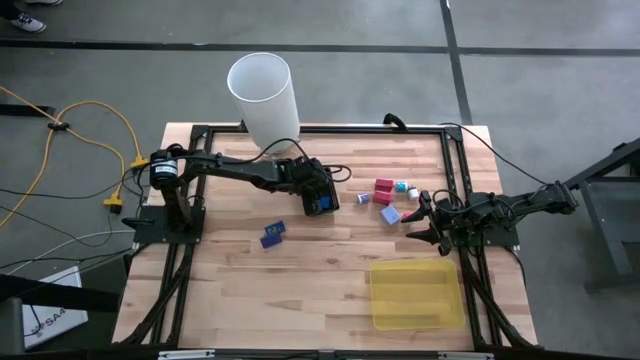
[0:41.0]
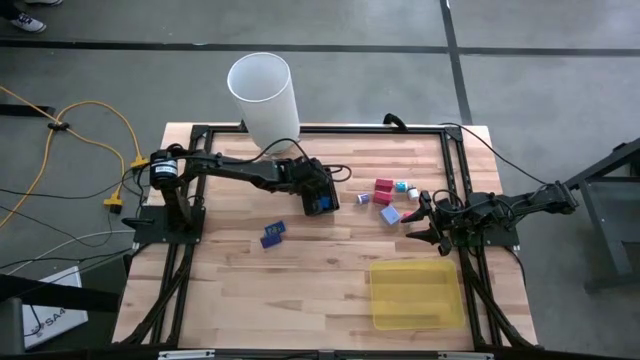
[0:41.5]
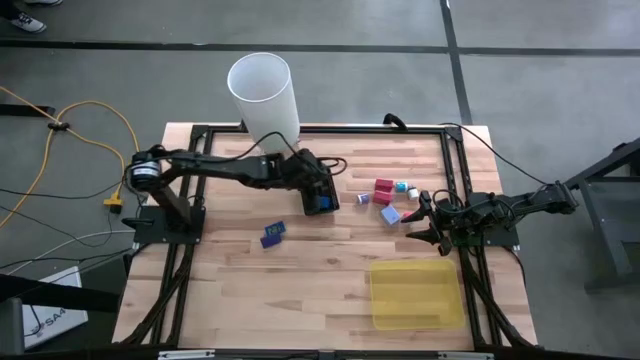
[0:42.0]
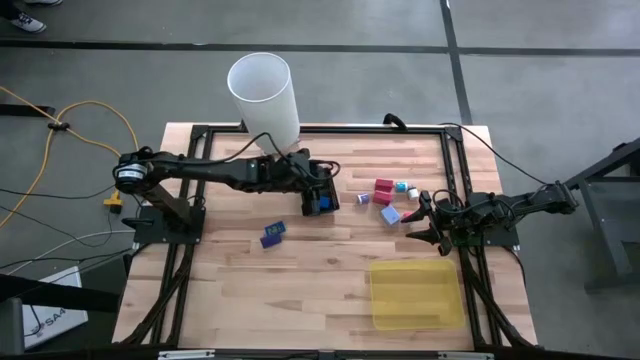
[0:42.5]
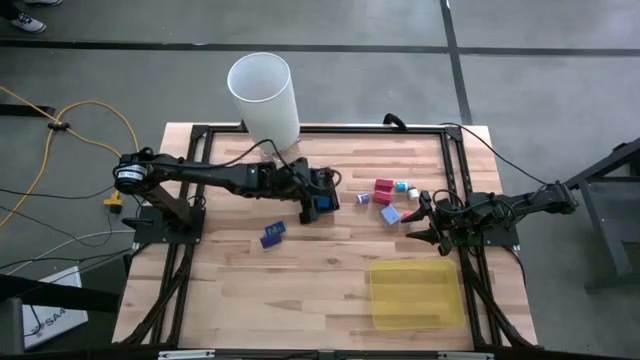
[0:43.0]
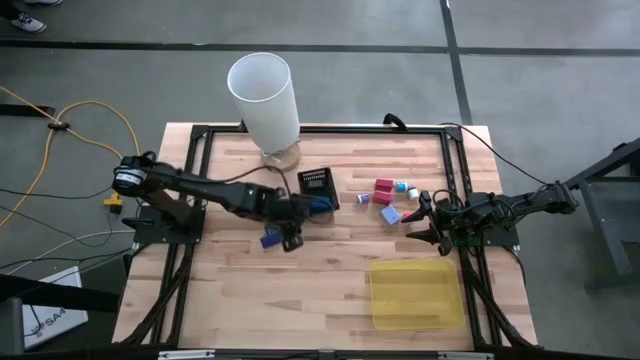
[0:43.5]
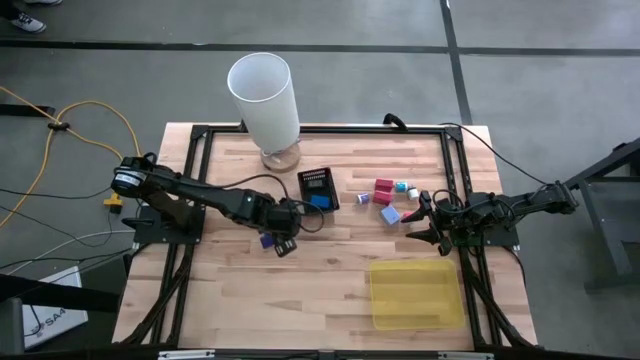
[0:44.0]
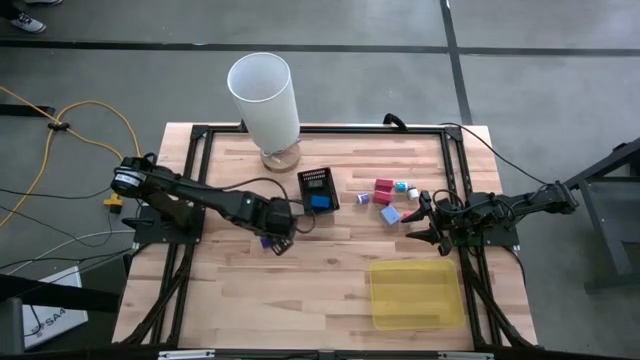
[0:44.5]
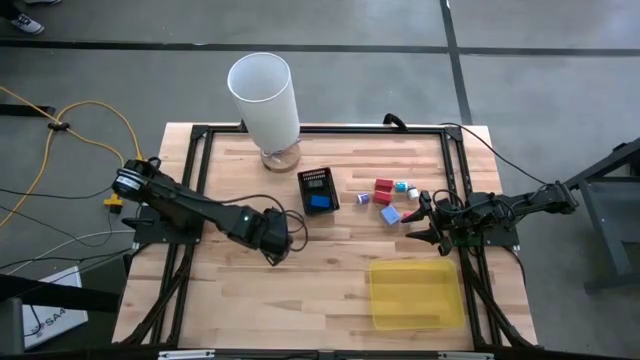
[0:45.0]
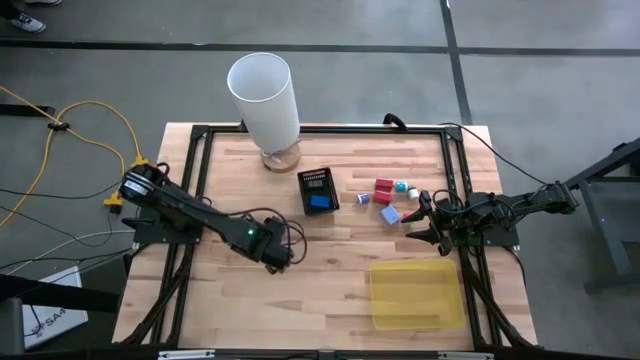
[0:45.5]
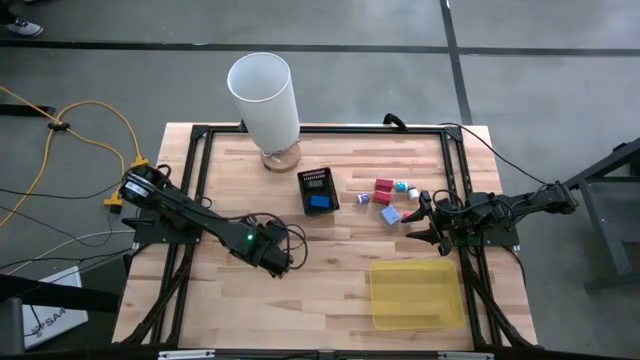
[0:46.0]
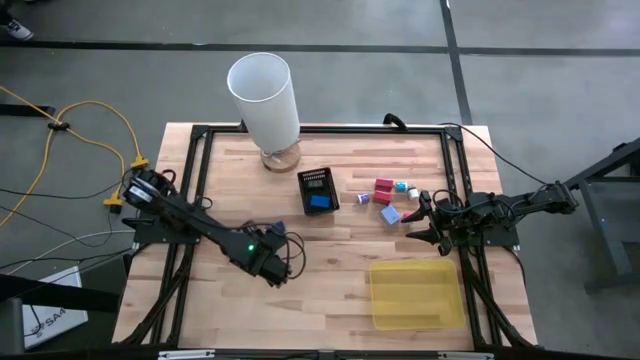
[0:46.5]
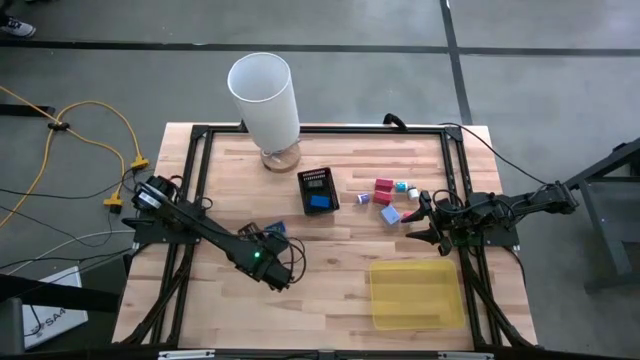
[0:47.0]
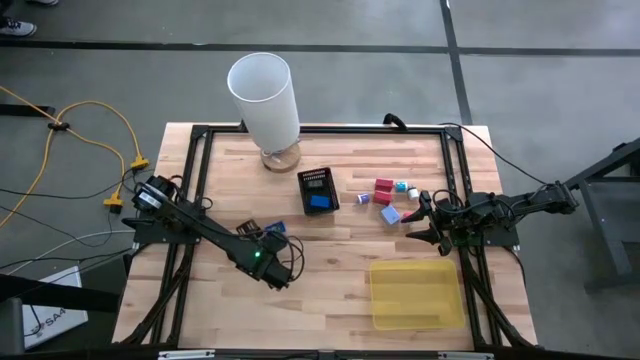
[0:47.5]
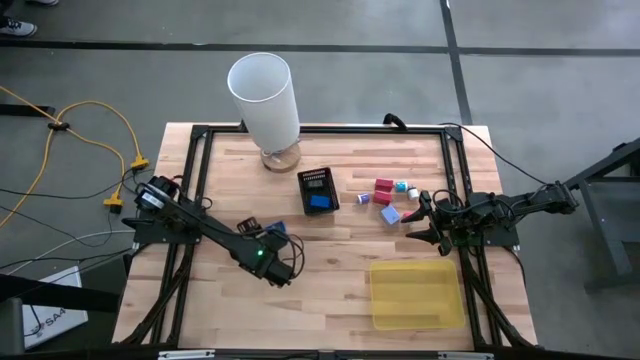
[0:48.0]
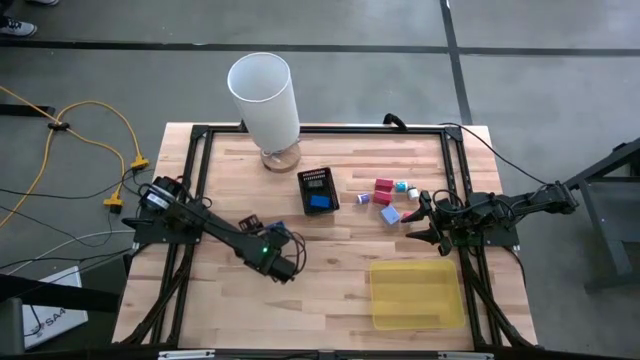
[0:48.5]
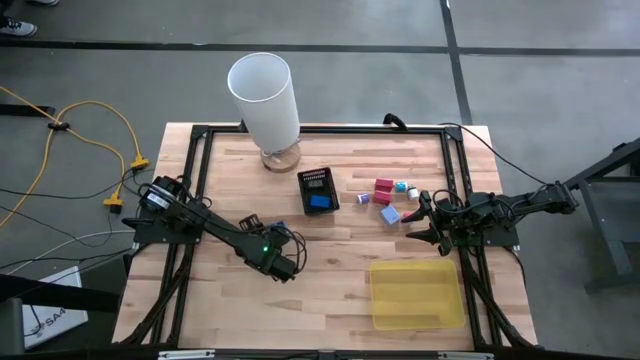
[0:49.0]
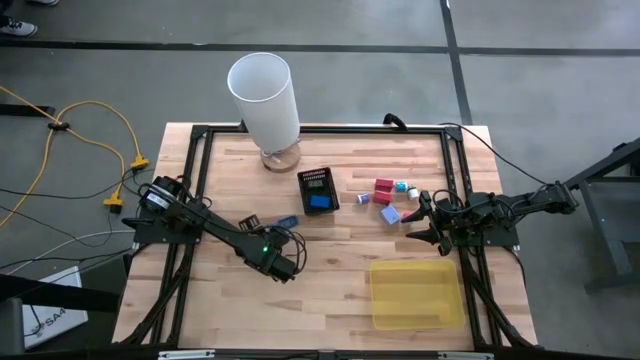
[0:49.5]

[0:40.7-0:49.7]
Task: Pick & Place Office items
Put the bottom blue digital timer into the black bin

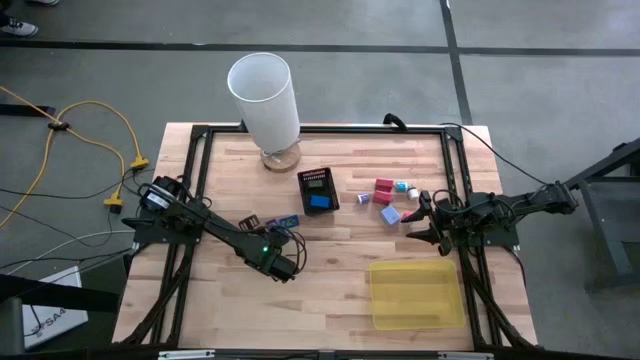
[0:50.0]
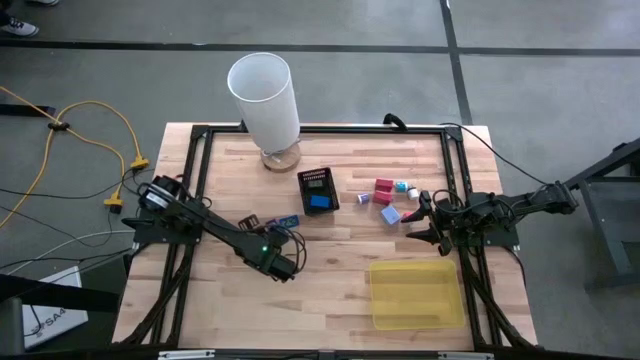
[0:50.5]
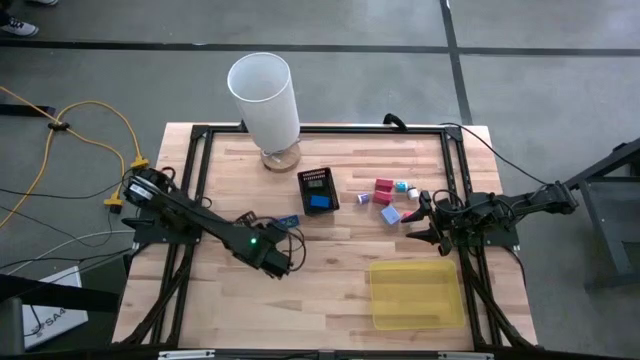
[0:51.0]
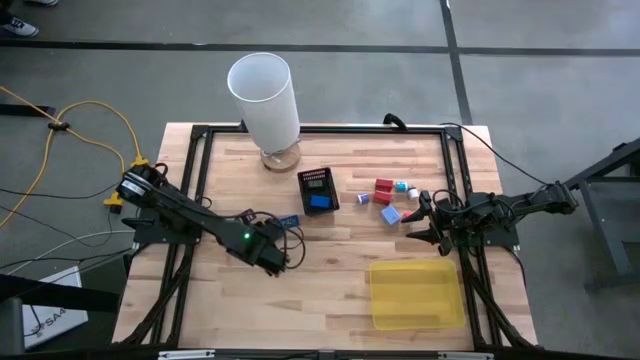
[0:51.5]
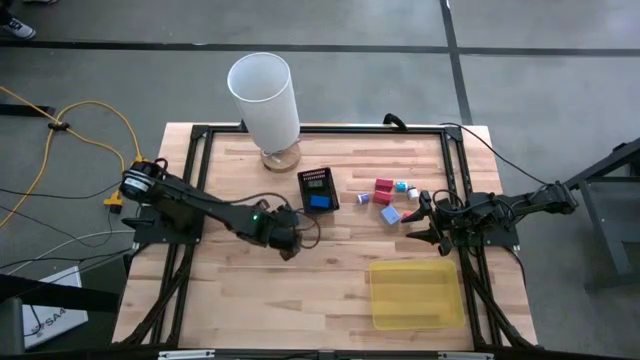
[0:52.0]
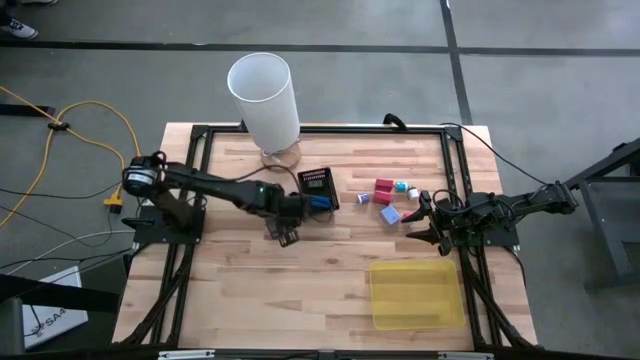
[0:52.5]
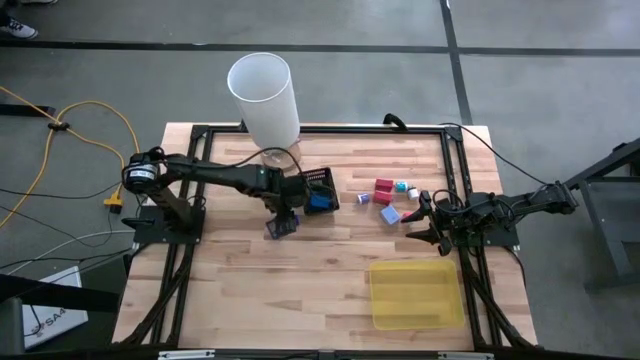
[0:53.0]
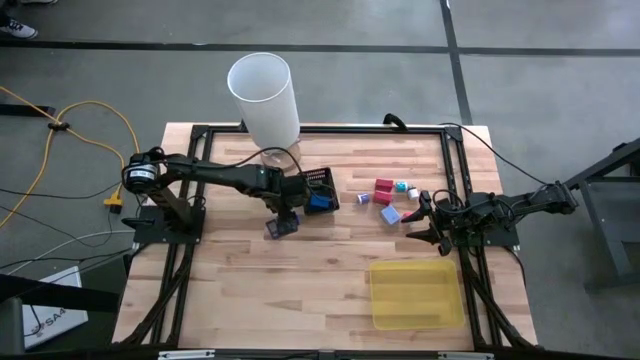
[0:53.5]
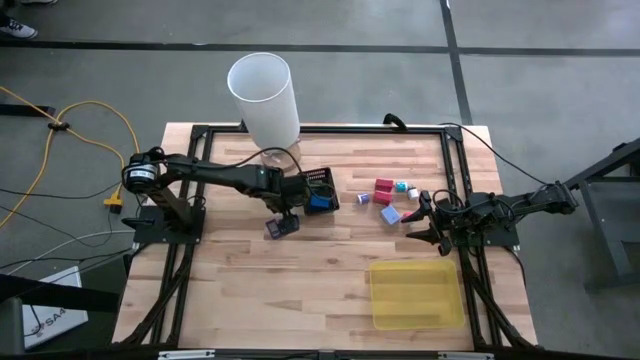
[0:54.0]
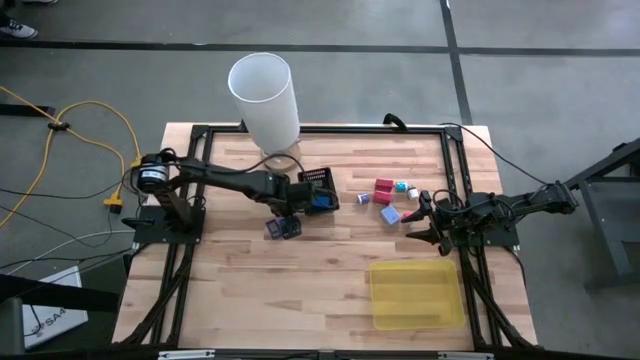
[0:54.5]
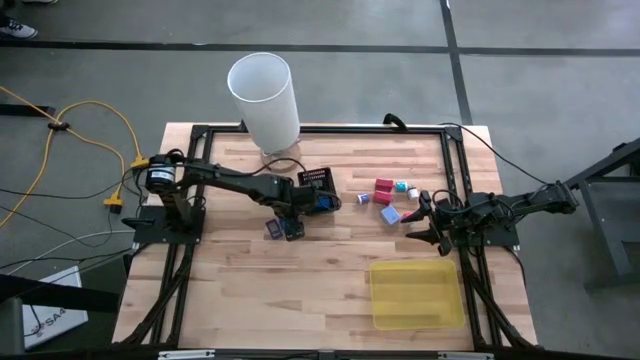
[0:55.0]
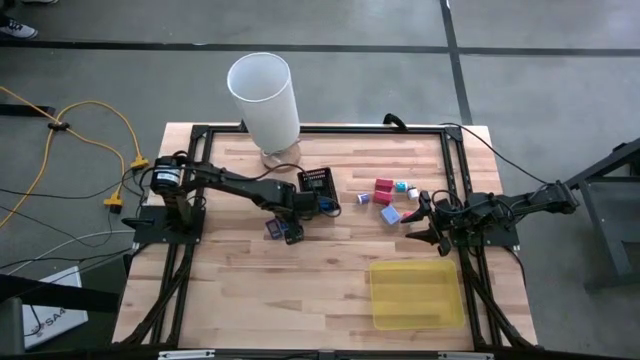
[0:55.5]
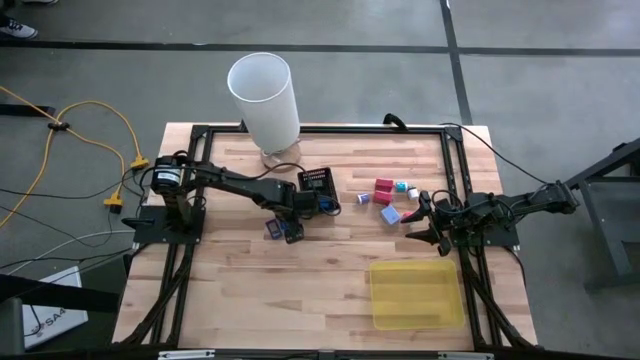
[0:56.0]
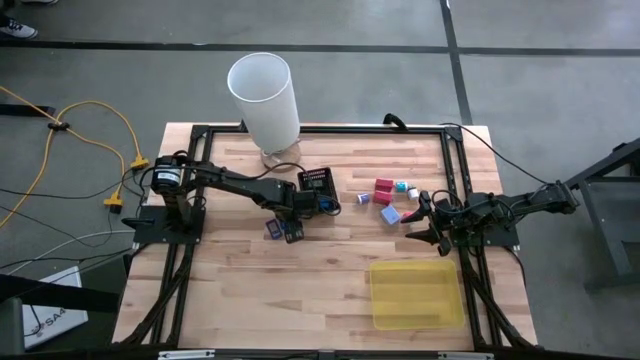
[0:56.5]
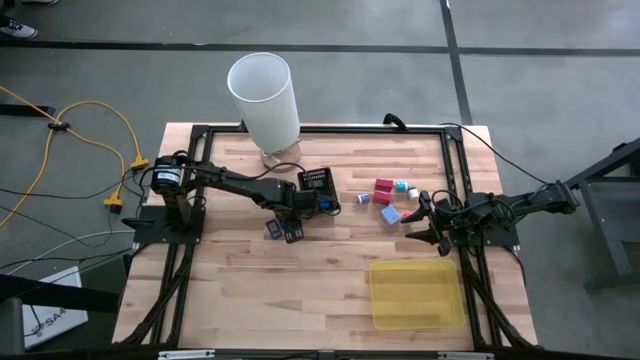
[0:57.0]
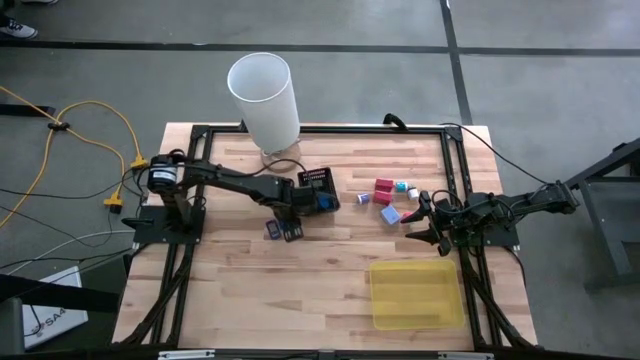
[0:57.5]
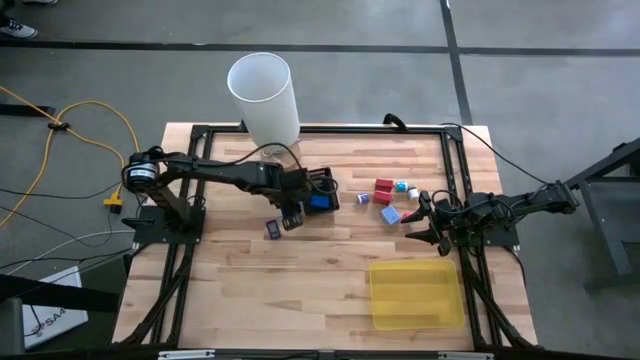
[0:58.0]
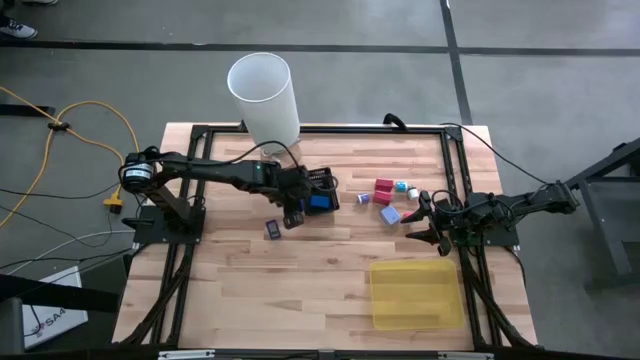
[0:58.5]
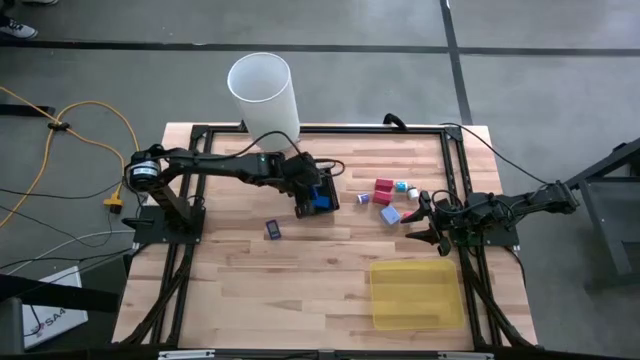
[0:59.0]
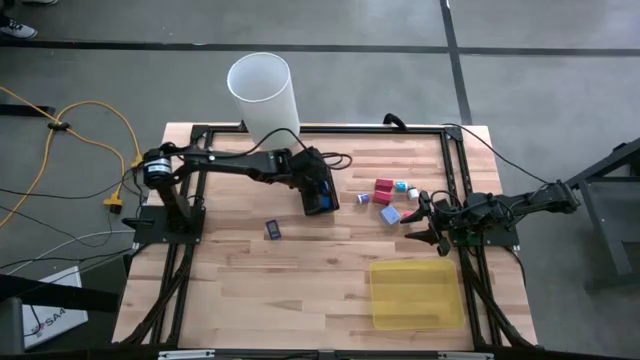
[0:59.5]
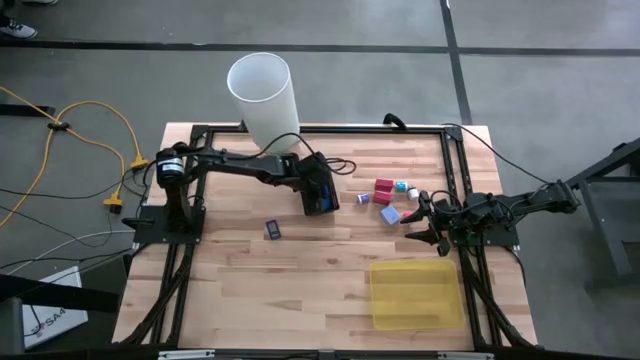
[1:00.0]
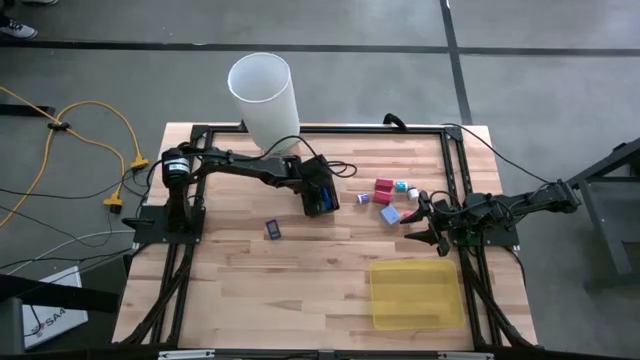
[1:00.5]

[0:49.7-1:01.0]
Put the right blue digital timer into the black bin
